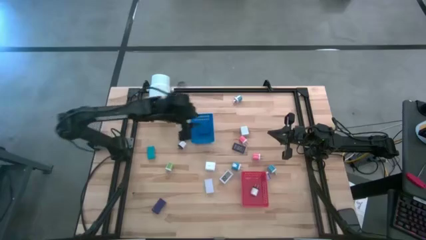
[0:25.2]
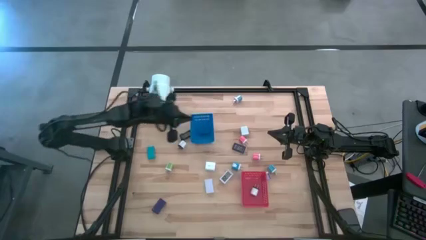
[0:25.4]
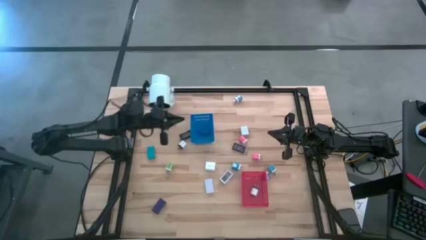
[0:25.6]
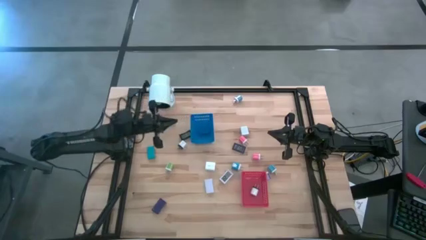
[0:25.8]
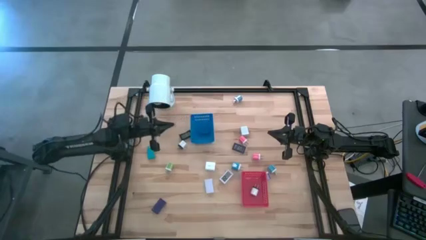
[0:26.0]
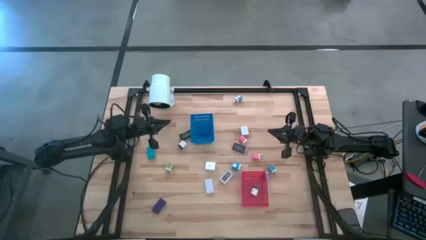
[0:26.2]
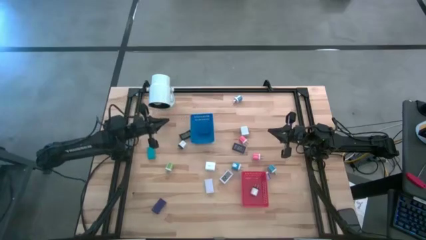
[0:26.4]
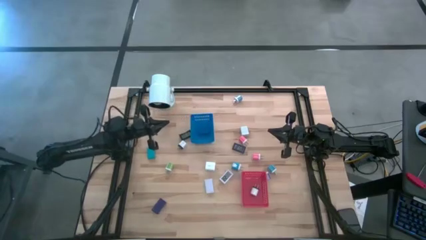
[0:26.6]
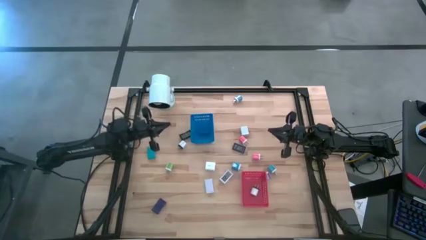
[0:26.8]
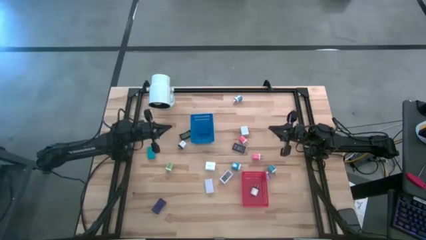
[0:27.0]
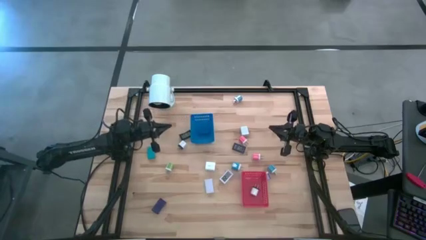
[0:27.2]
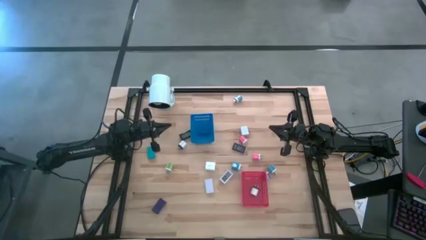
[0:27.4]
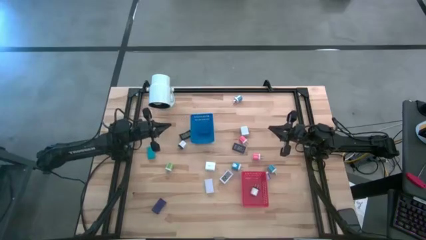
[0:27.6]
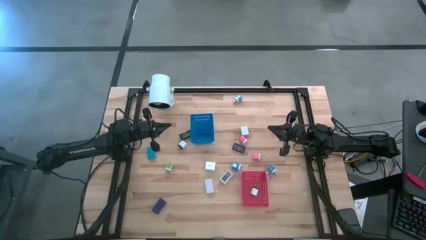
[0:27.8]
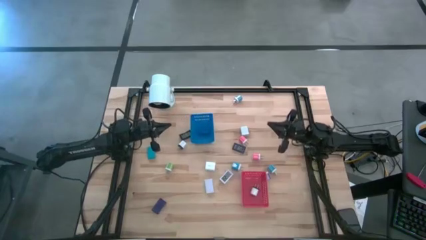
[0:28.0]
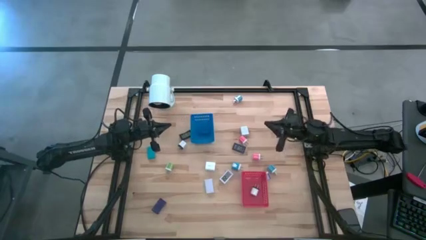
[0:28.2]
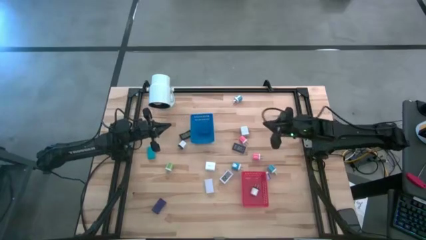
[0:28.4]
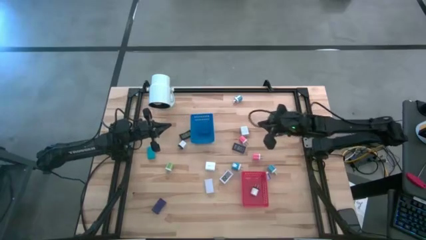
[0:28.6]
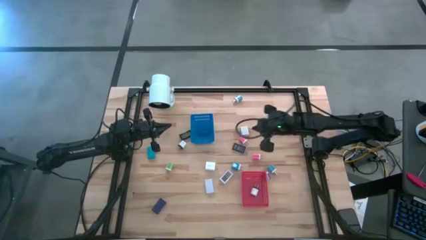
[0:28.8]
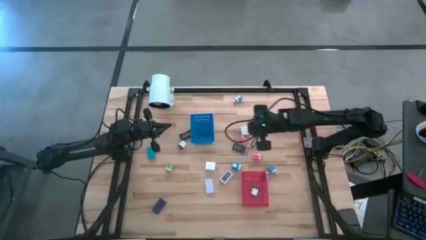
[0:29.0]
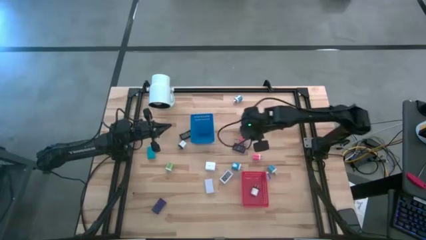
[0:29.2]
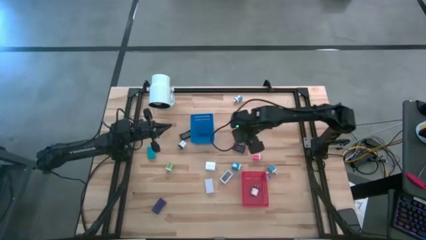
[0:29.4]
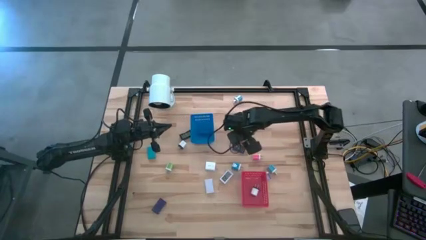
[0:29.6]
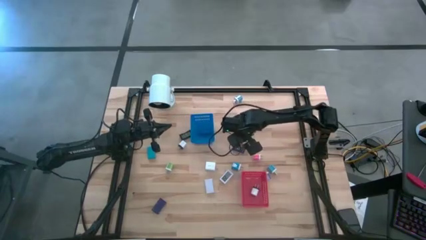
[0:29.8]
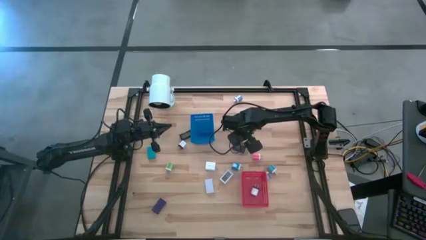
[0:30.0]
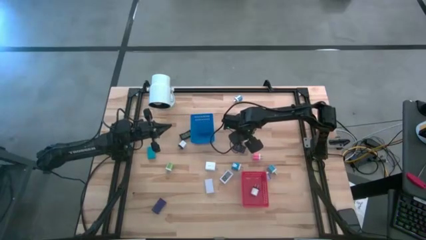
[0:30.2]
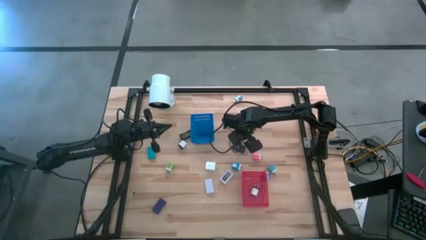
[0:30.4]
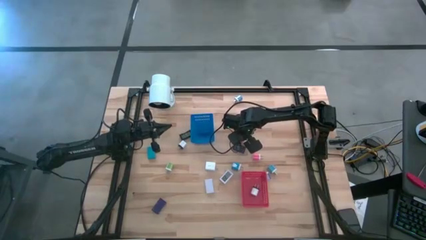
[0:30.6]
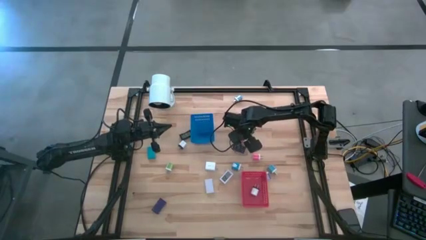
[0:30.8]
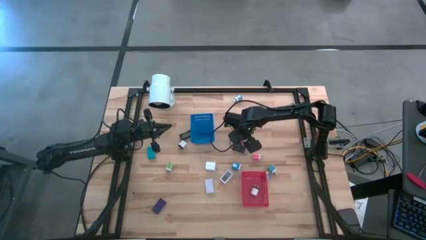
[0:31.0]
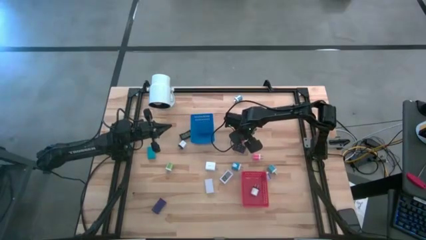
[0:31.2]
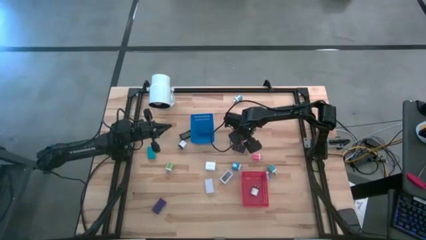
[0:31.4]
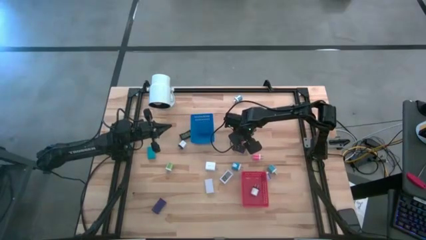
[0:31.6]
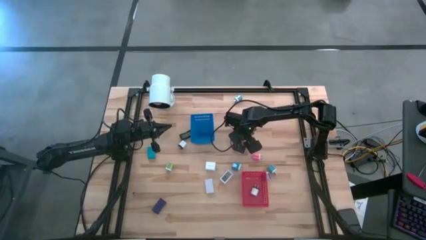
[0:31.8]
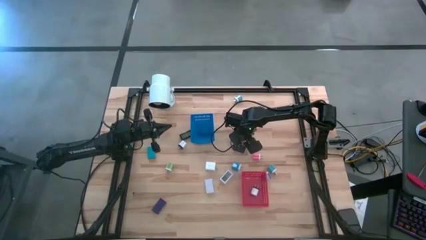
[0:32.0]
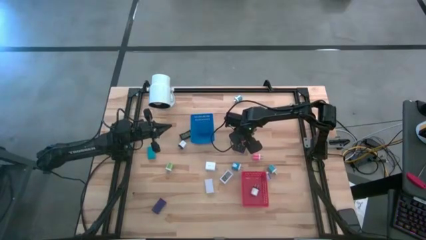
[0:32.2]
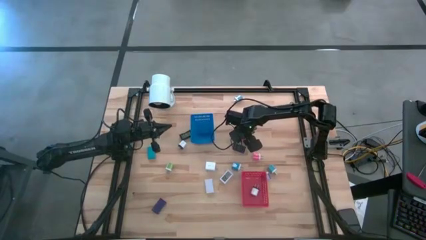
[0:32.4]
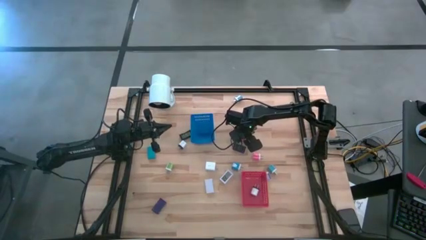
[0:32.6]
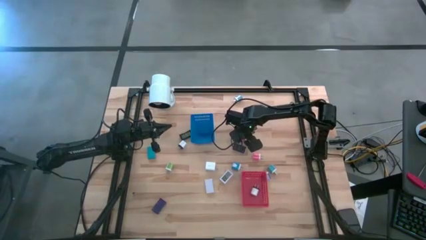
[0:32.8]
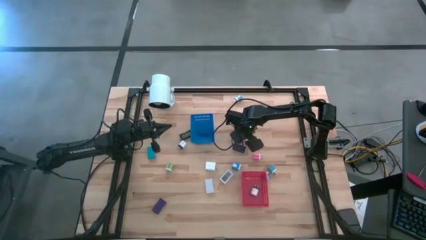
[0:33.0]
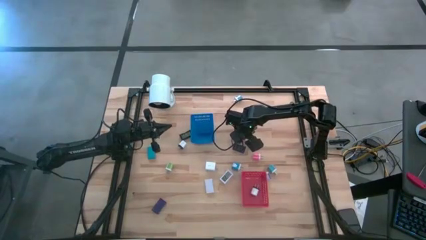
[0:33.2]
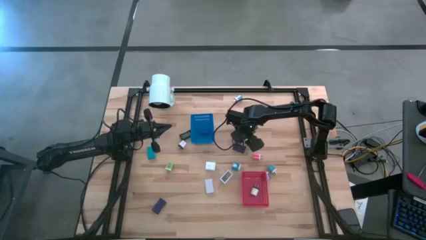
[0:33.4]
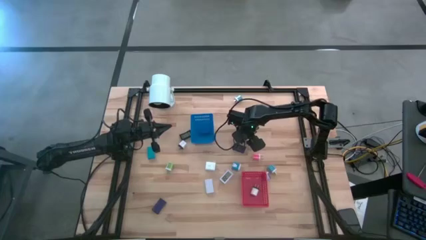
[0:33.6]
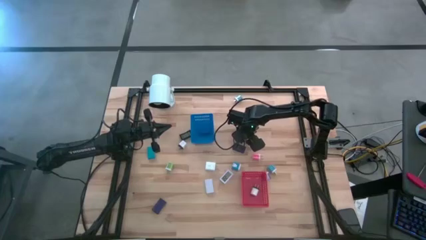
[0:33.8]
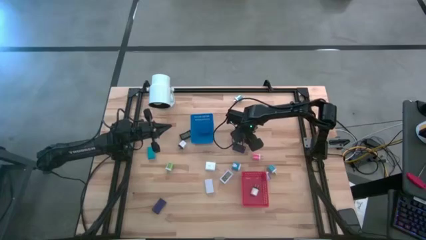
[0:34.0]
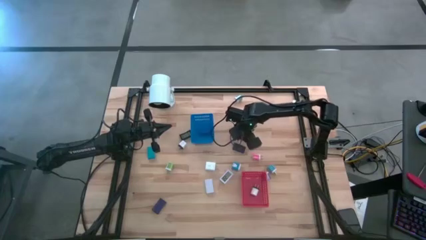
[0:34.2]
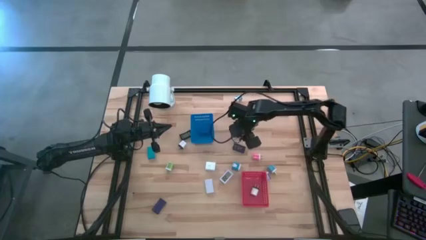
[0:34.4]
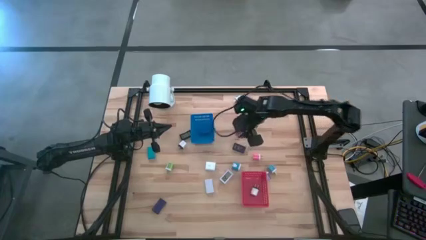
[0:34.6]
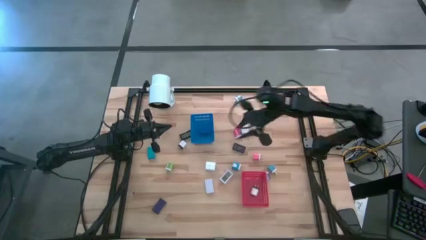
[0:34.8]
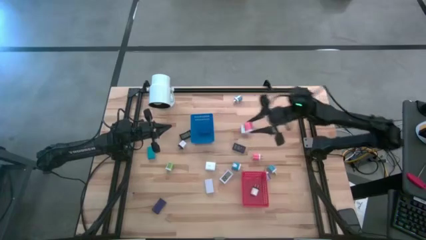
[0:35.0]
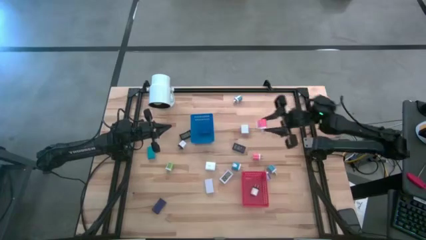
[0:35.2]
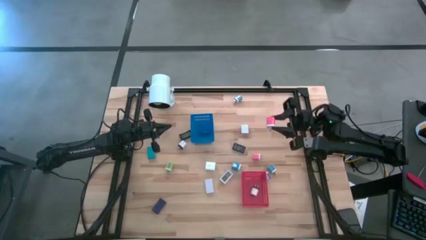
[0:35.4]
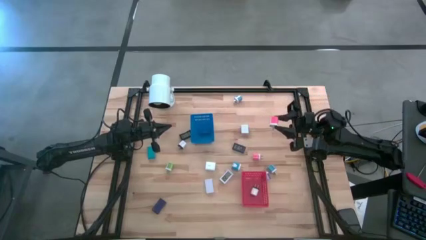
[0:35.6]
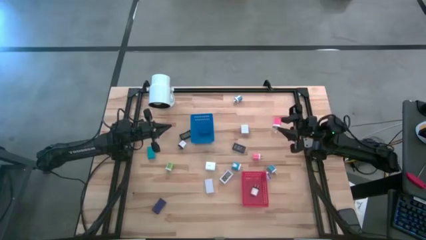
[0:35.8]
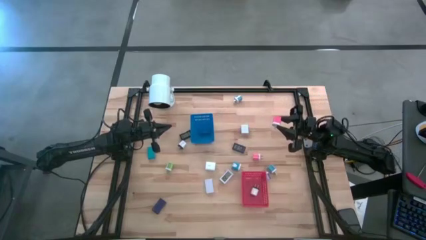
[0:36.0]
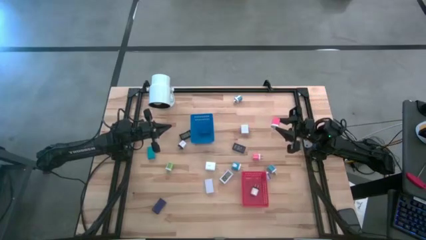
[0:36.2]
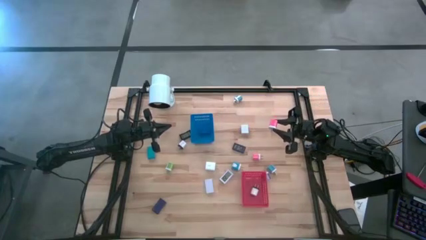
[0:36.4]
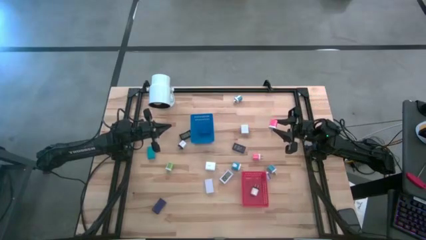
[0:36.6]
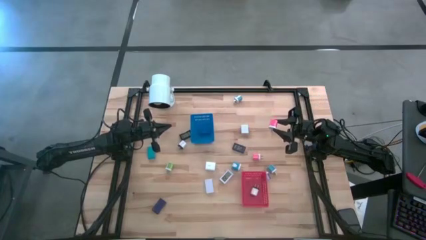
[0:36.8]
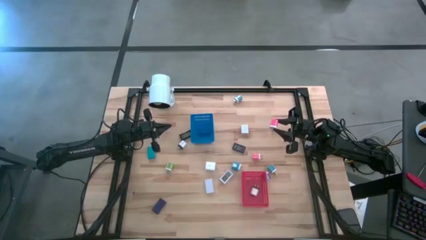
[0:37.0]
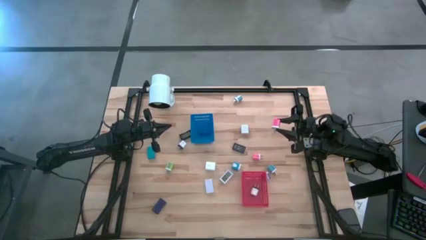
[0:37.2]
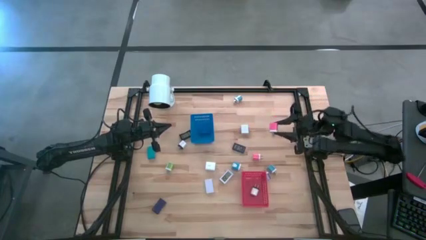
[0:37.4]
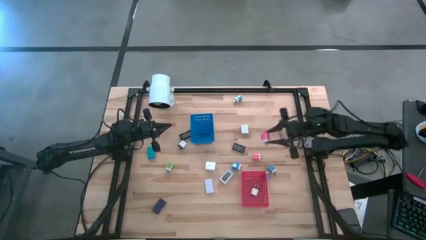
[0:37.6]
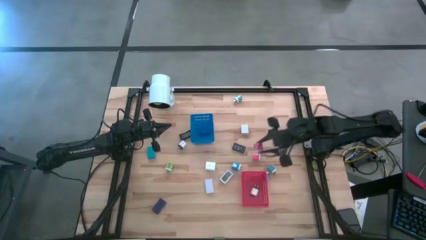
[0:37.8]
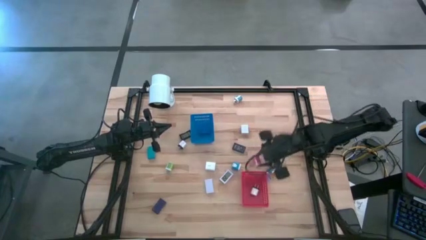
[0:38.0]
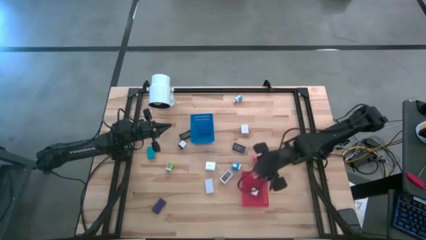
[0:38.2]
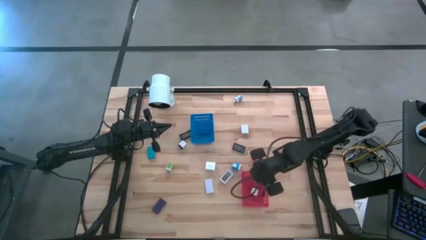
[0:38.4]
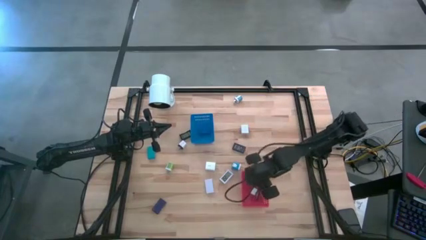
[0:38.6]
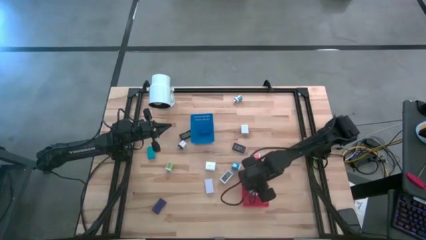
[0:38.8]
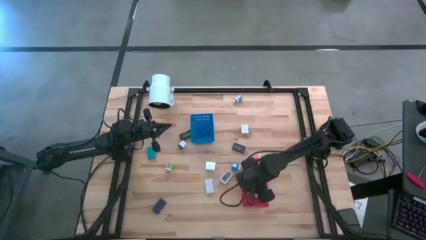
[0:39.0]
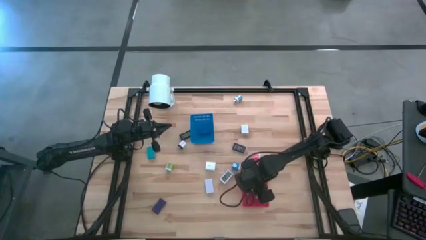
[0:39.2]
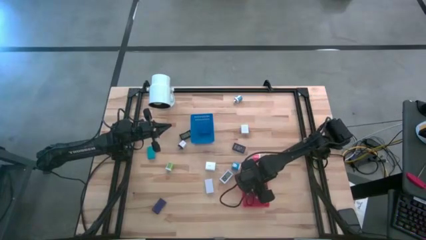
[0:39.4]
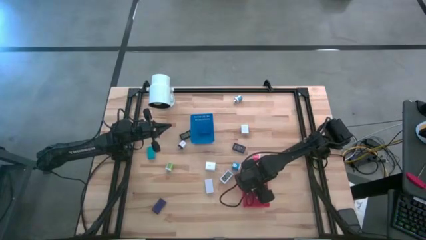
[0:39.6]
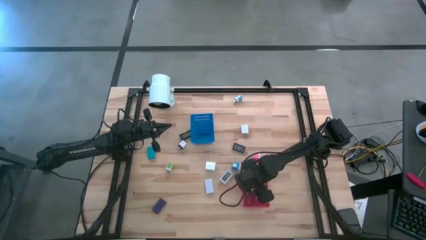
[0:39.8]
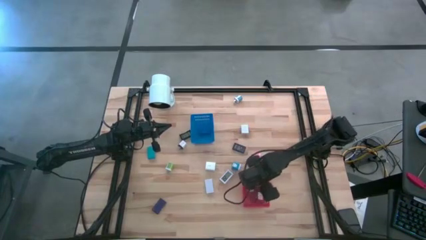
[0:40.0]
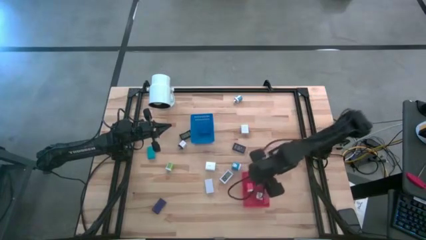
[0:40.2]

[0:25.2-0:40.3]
Task: Pick & Place Office items
Put the left pink charger adapter into the red bin
